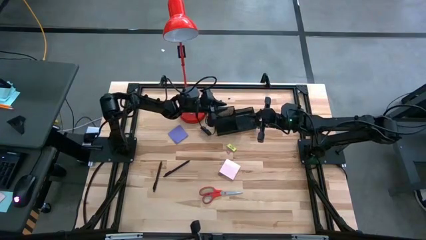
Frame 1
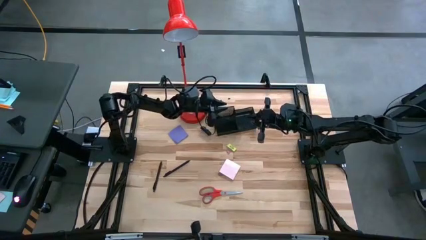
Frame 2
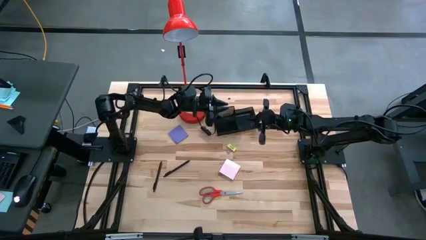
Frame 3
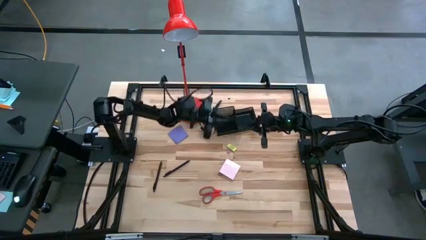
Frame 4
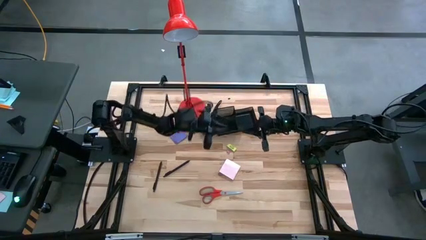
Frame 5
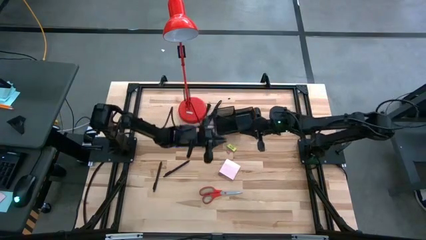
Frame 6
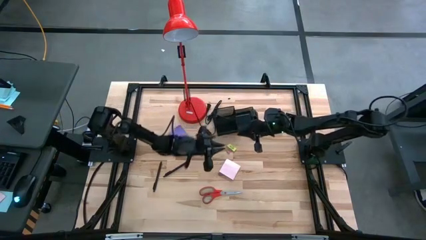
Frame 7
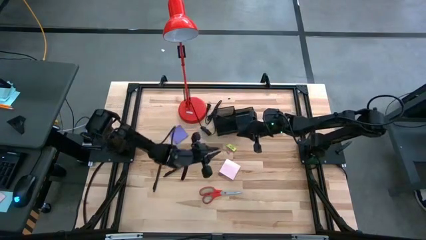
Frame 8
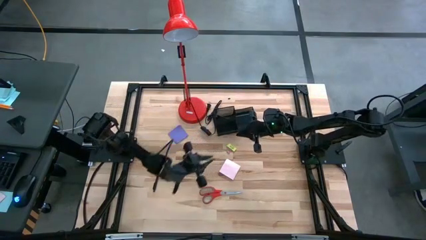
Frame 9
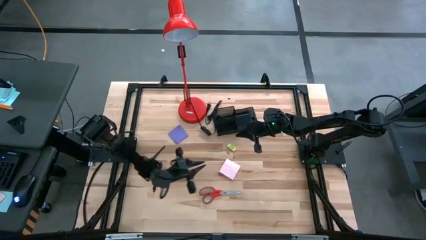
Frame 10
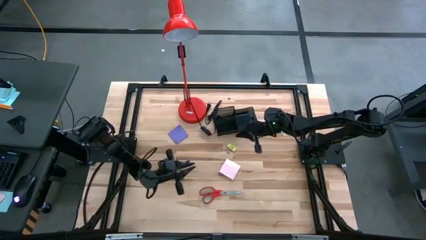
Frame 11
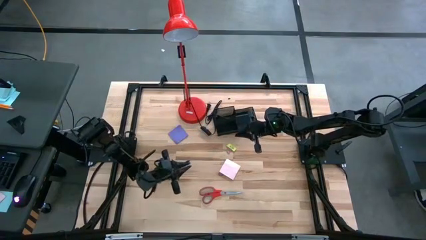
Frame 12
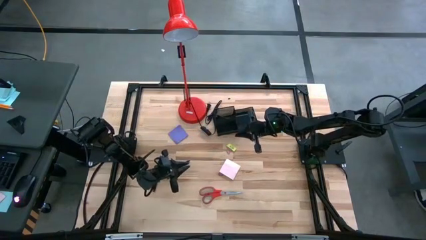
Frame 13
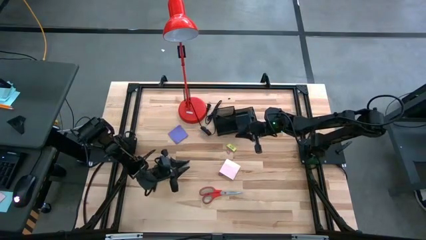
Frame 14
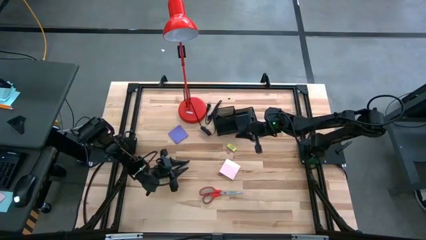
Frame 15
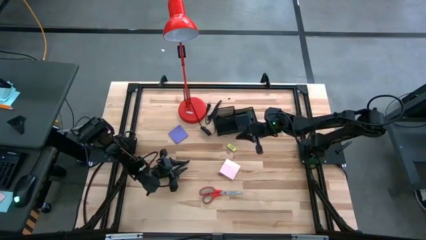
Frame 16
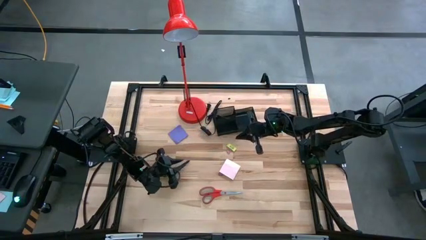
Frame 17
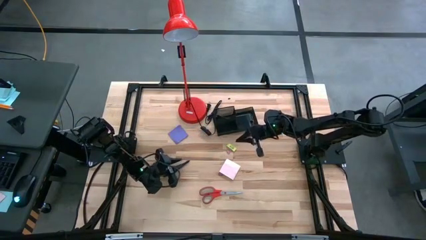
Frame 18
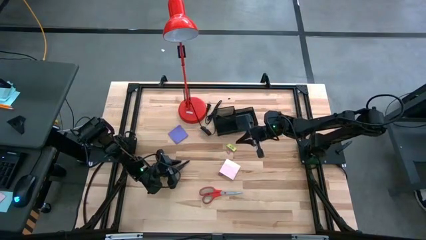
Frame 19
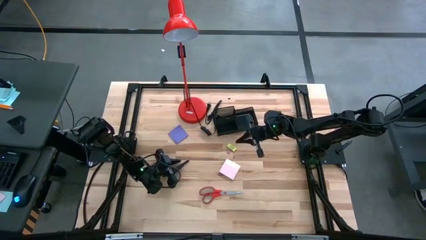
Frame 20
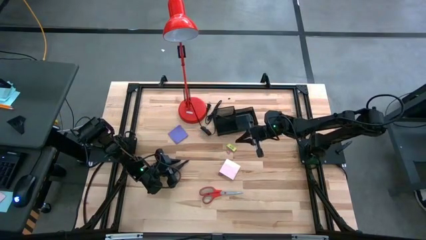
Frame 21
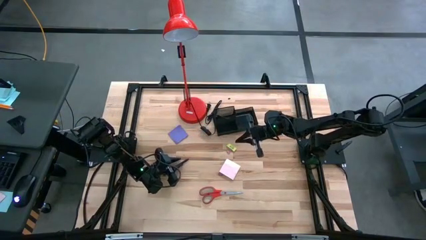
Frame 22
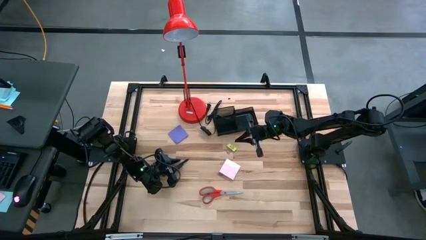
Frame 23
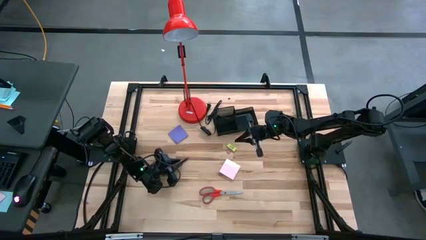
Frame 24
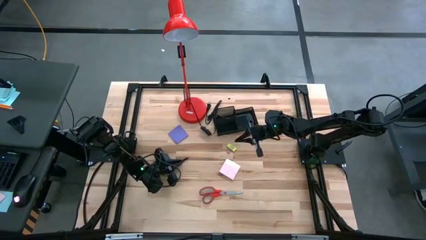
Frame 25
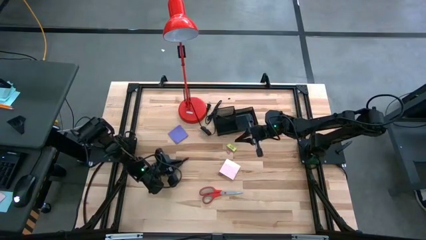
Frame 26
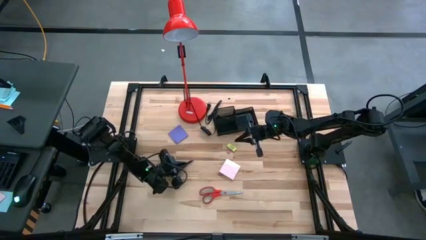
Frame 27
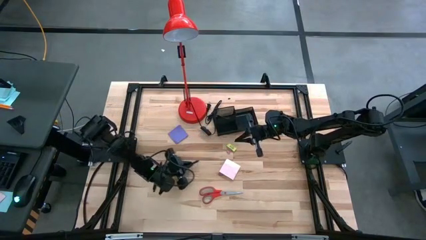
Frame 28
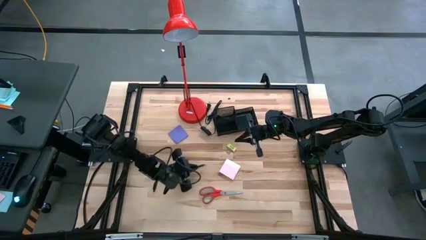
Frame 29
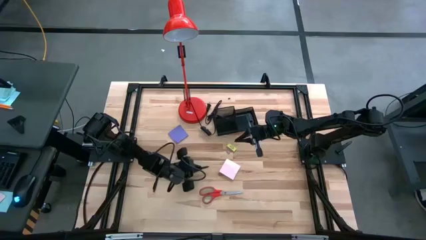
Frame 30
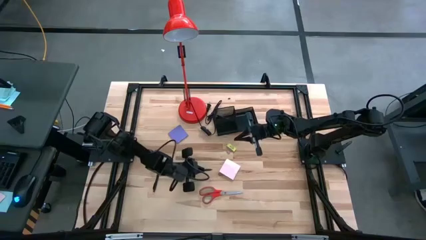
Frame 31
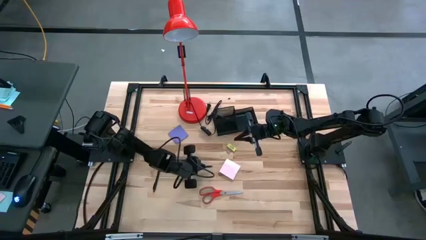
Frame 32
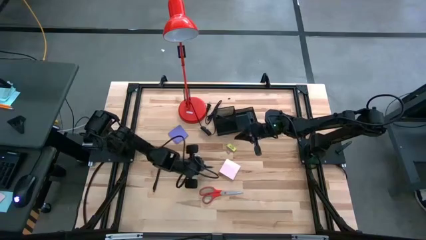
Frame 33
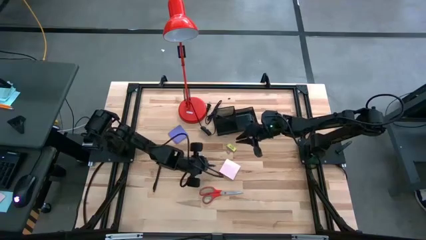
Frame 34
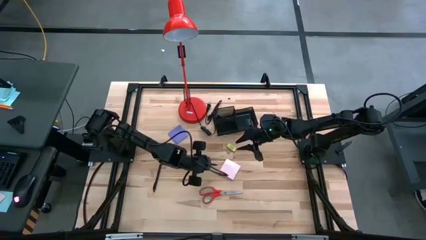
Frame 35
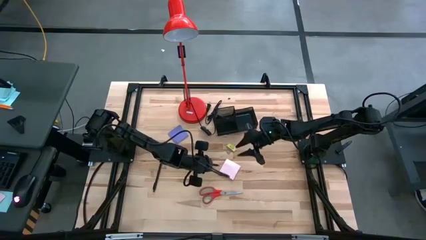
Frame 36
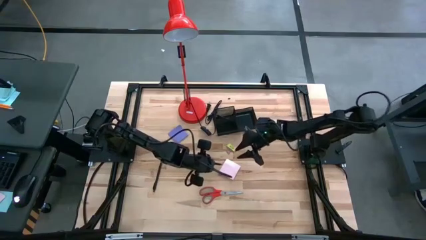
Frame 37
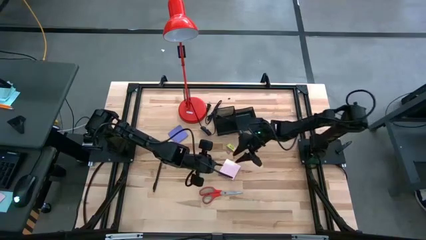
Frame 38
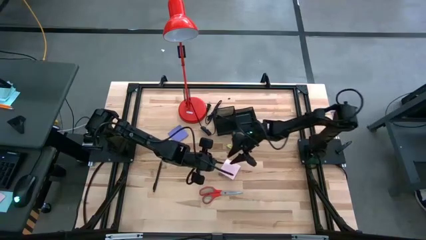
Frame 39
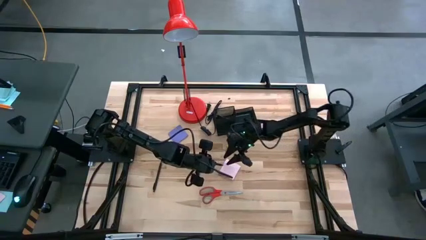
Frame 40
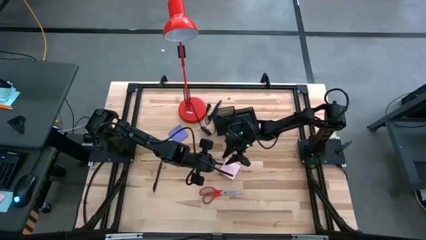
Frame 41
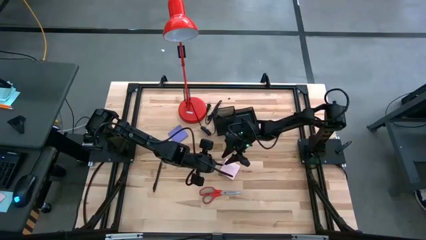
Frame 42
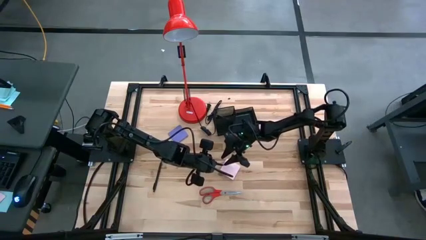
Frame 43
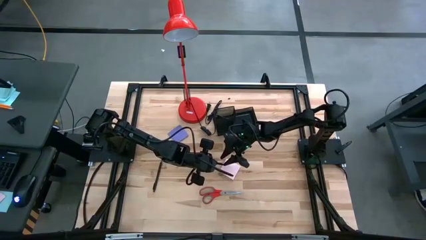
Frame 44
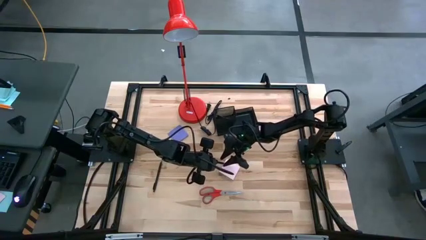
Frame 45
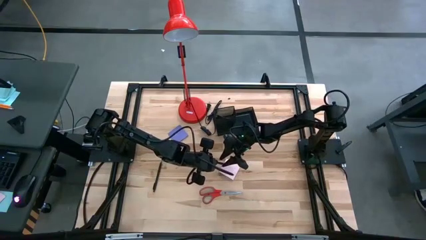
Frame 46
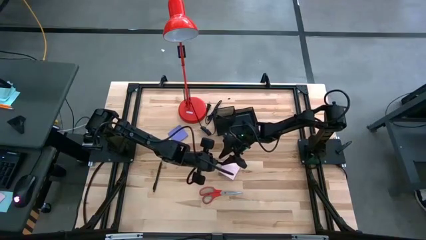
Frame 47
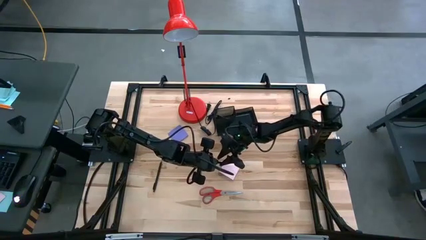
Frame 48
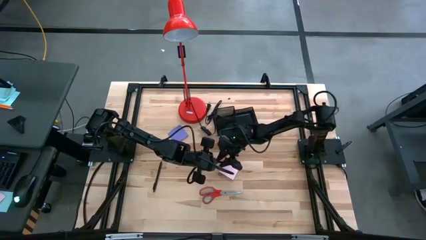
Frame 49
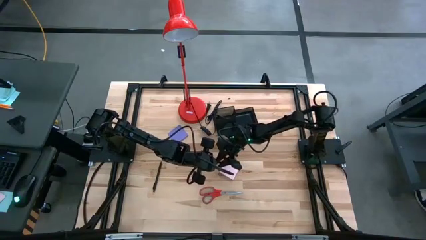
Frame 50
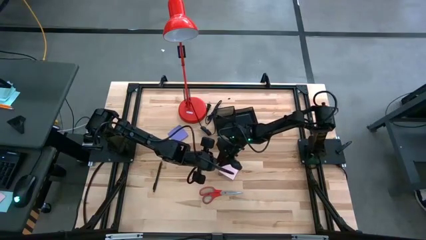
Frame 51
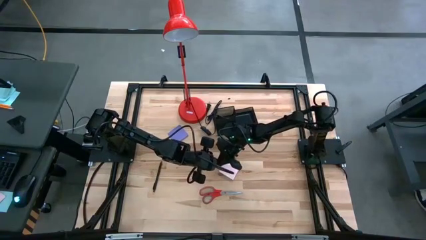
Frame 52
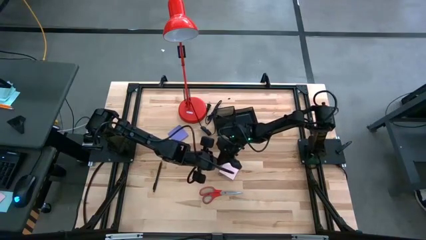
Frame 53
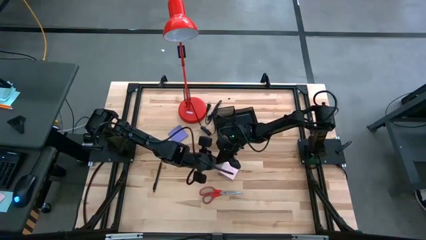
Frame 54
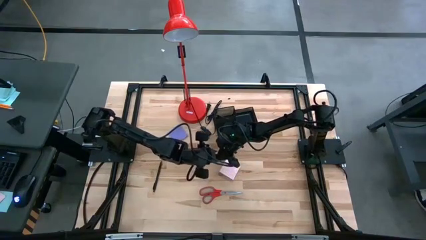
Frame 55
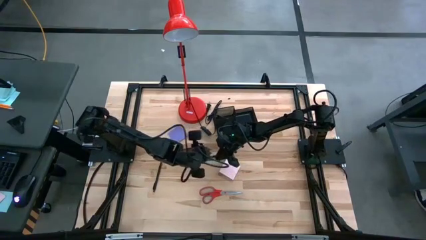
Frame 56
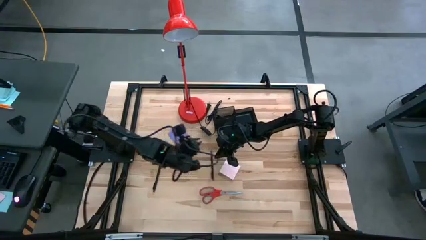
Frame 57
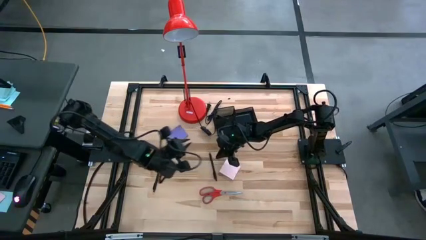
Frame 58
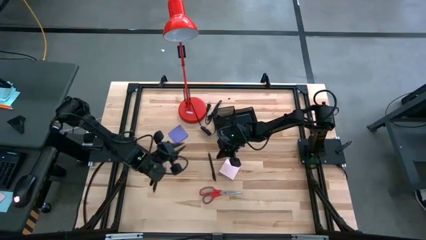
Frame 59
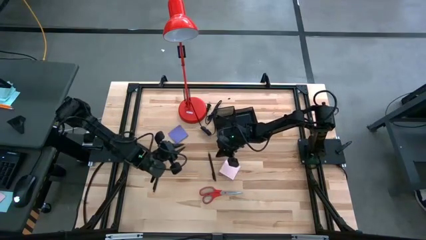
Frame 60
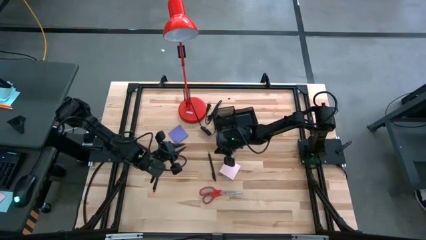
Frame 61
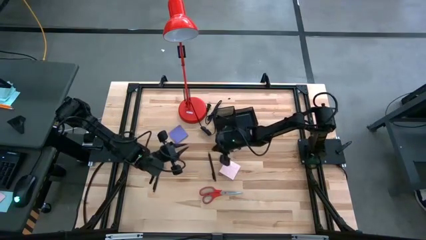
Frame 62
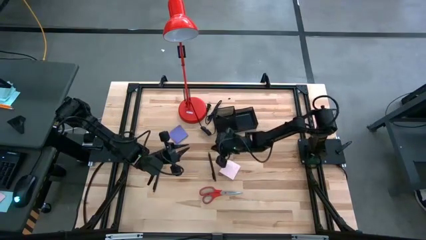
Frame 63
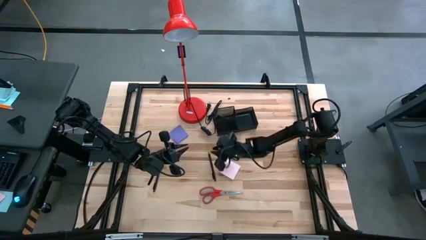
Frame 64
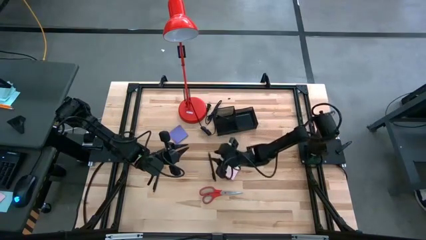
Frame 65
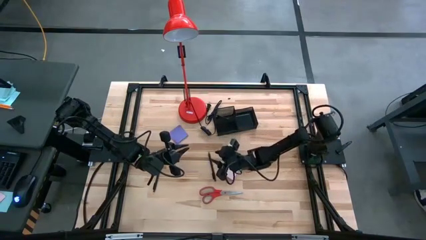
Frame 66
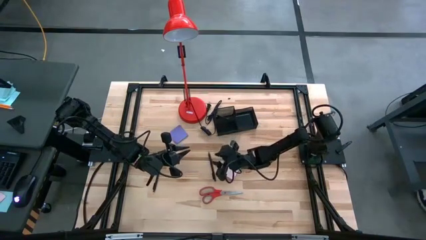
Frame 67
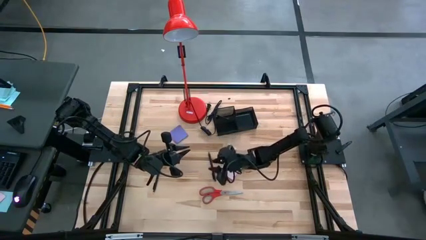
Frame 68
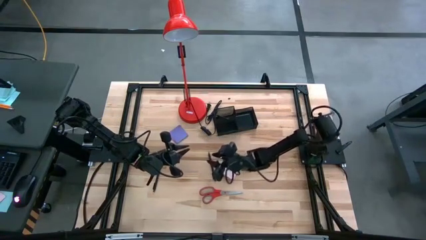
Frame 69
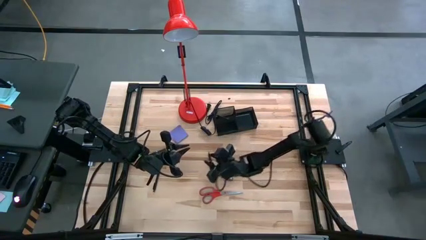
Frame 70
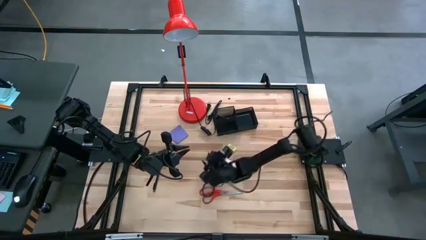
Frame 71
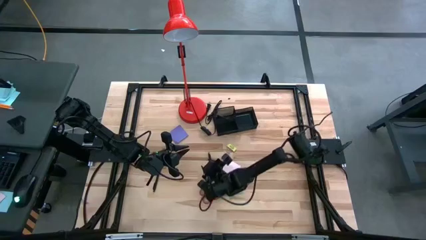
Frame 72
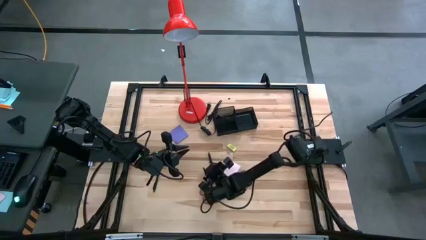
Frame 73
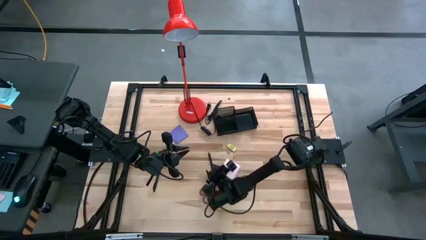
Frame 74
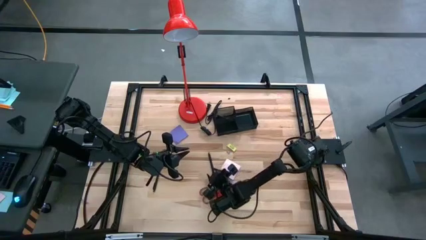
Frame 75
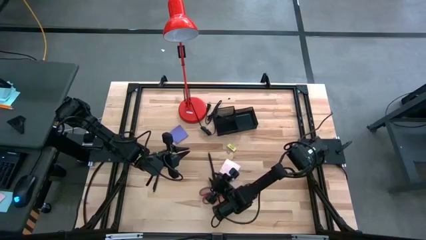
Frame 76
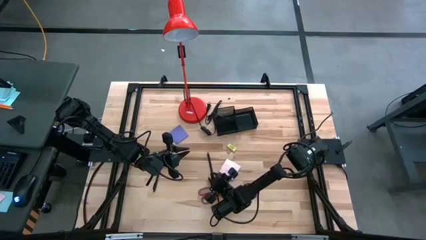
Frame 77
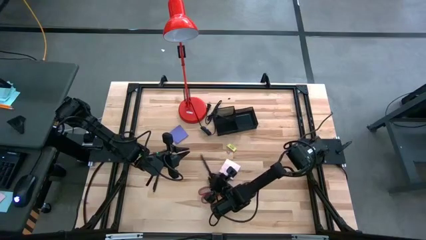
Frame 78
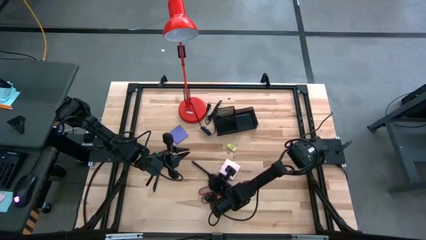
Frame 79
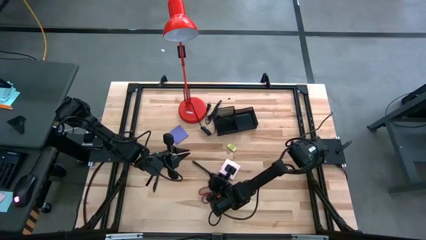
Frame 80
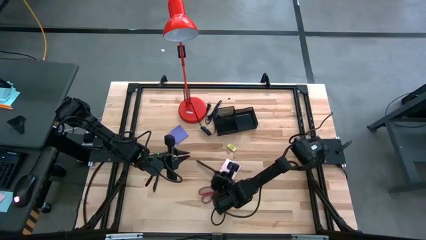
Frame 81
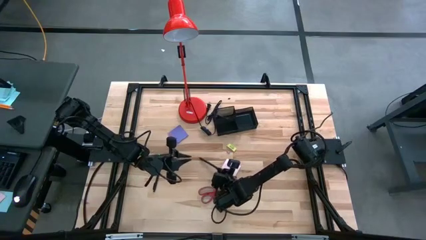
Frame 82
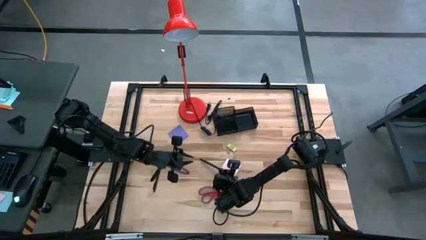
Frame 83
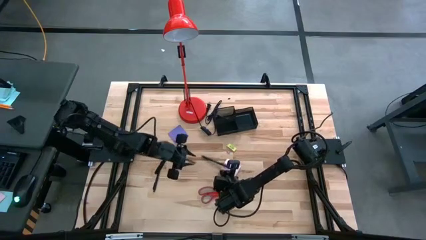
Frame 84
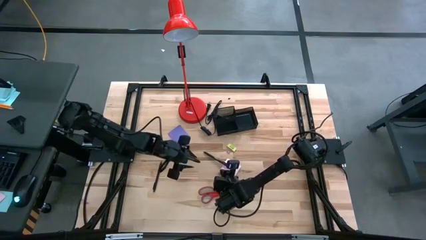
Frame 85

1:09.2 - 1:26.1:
Task: Pick and place office supplies into organizer
Put the black pen into the black desk organizer
